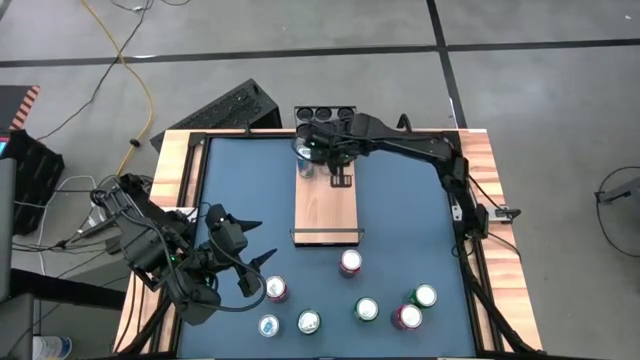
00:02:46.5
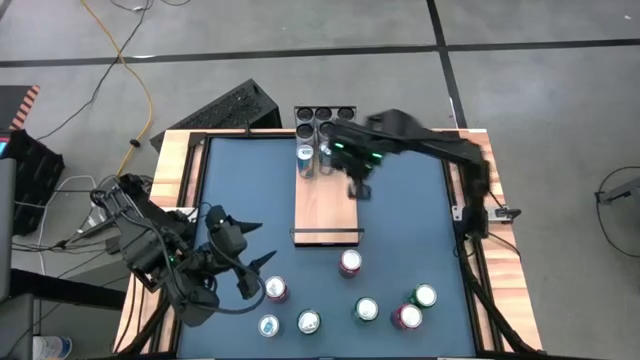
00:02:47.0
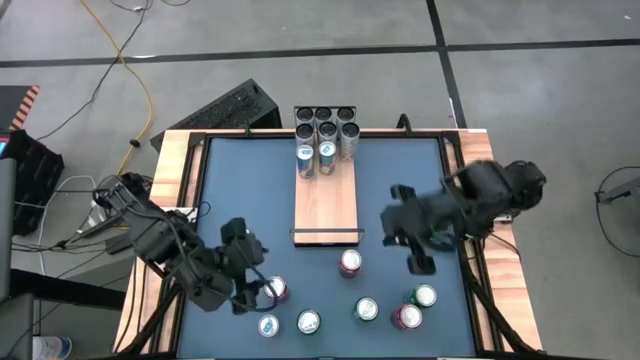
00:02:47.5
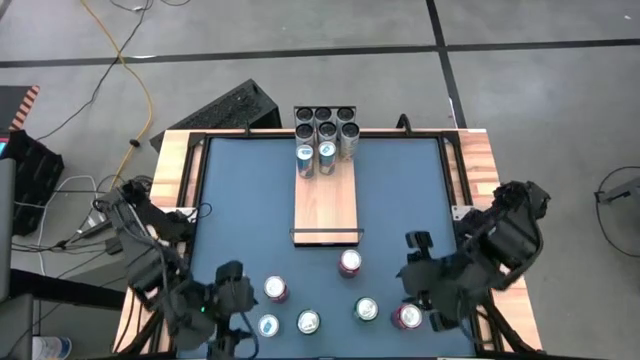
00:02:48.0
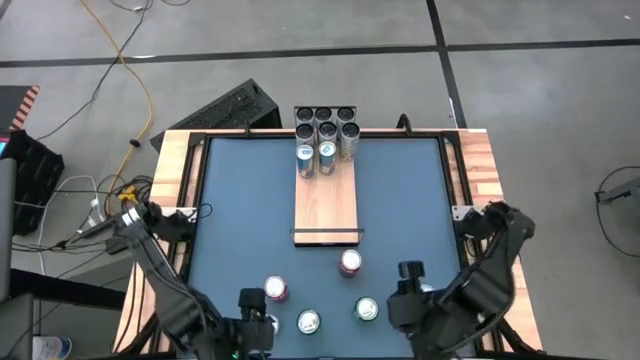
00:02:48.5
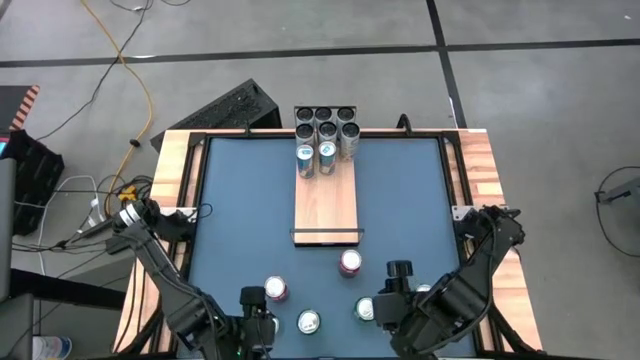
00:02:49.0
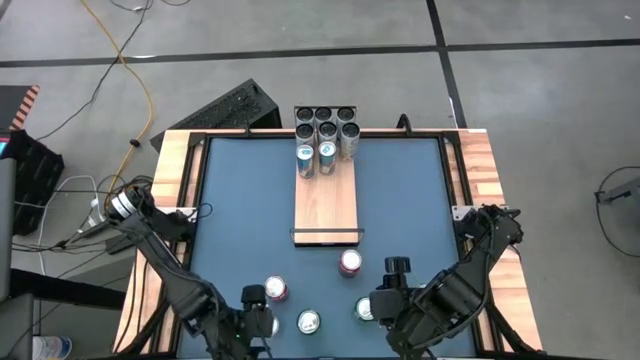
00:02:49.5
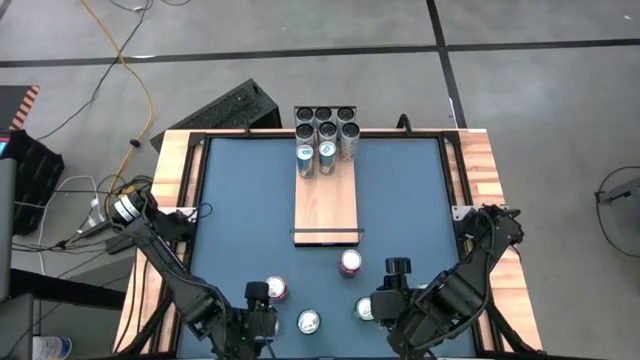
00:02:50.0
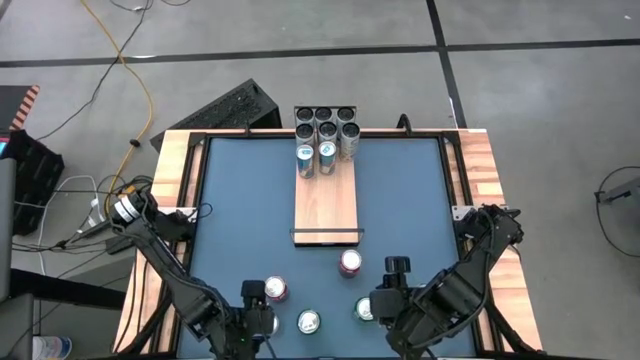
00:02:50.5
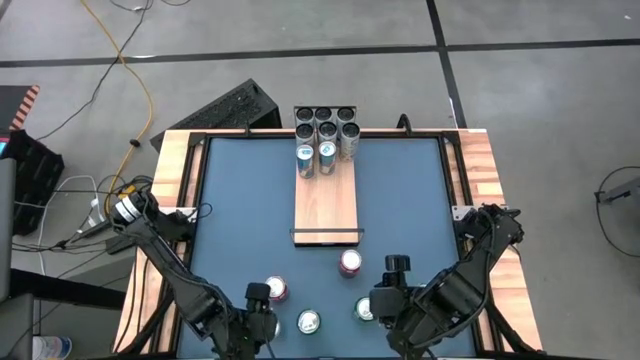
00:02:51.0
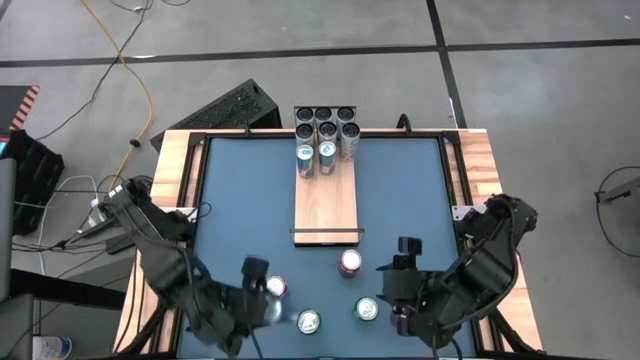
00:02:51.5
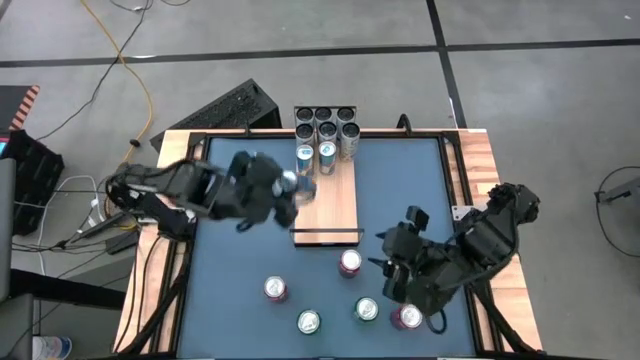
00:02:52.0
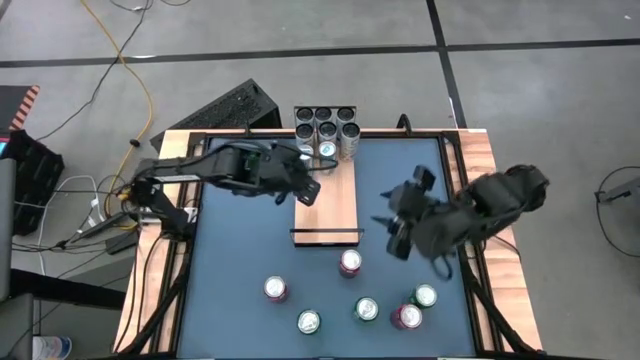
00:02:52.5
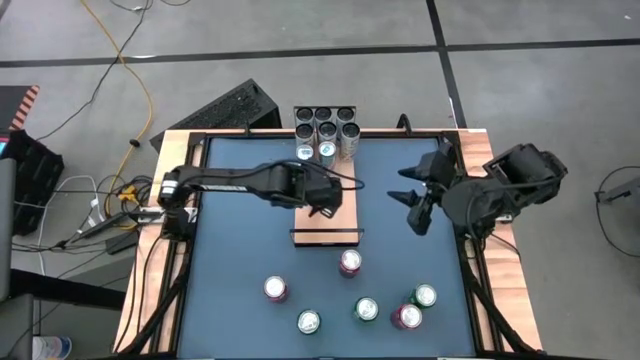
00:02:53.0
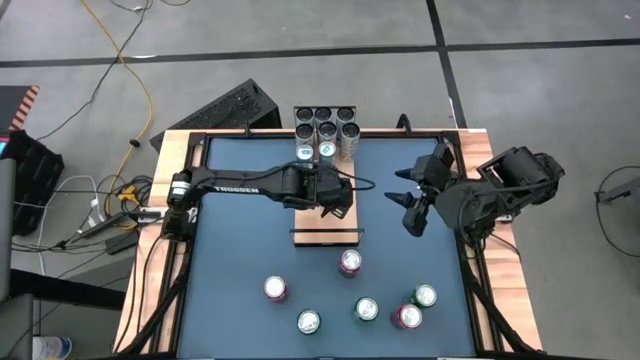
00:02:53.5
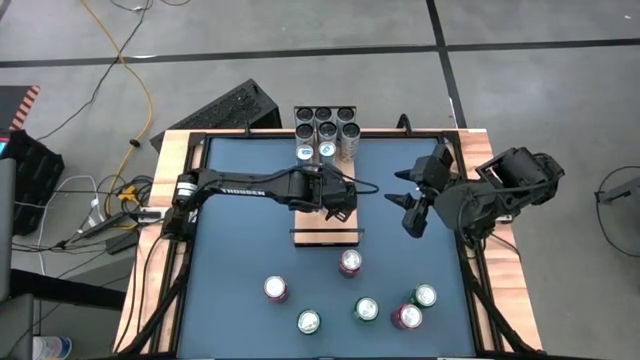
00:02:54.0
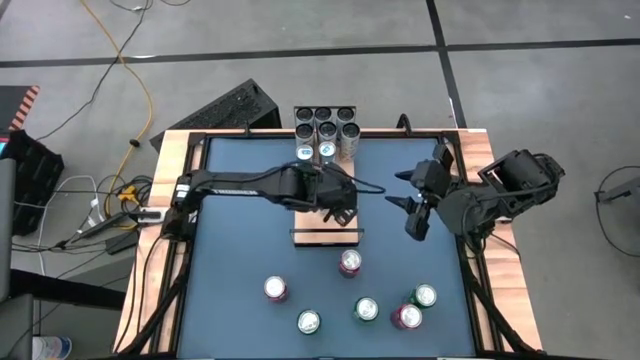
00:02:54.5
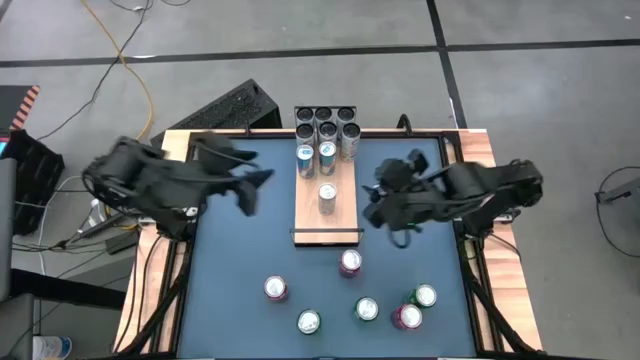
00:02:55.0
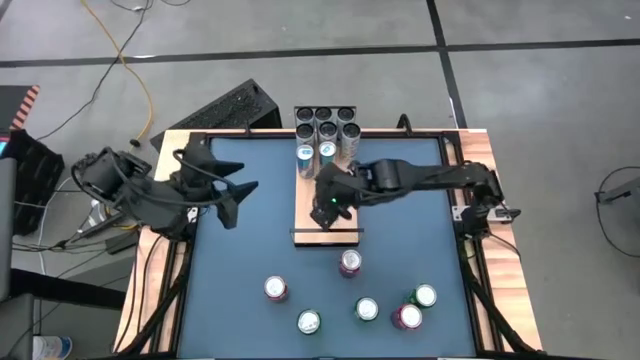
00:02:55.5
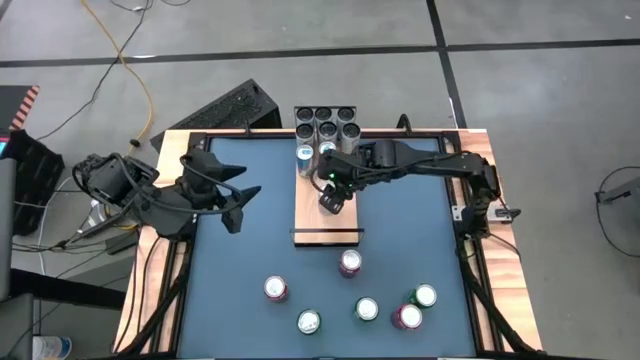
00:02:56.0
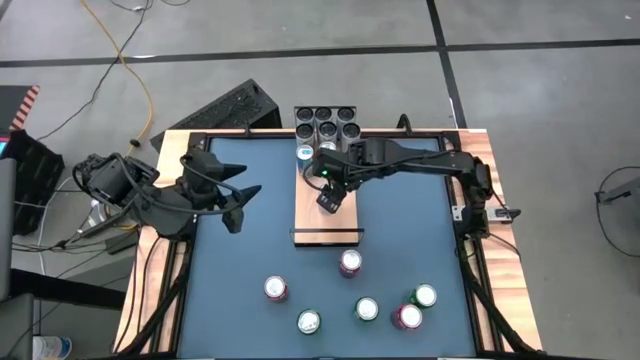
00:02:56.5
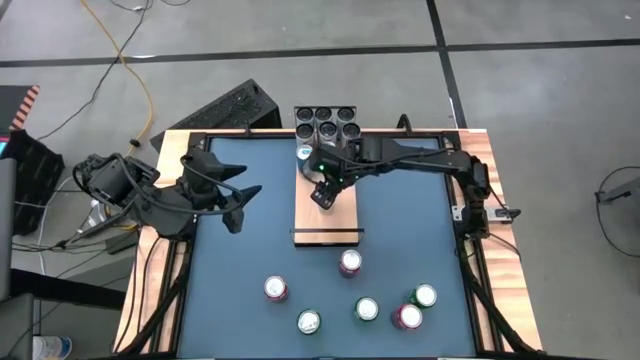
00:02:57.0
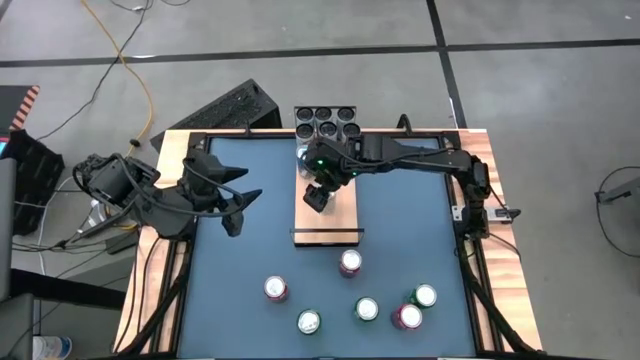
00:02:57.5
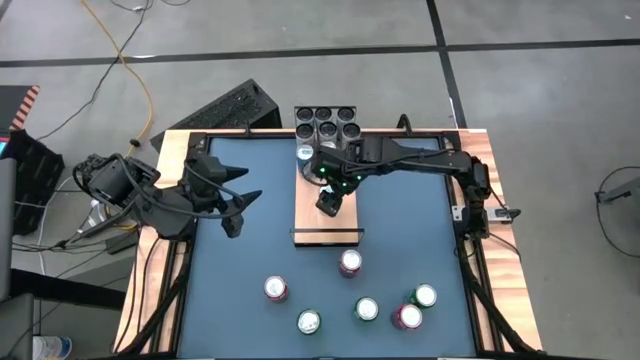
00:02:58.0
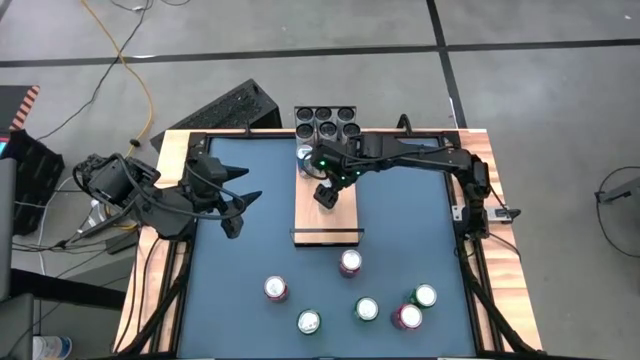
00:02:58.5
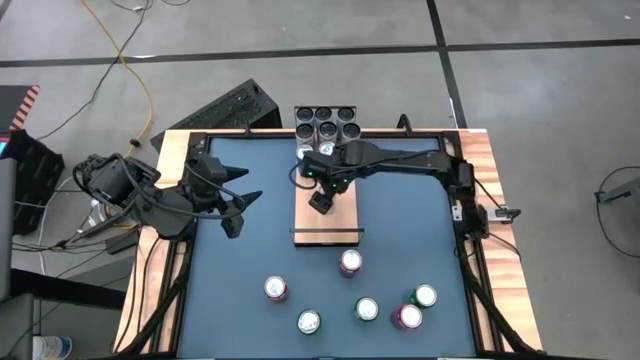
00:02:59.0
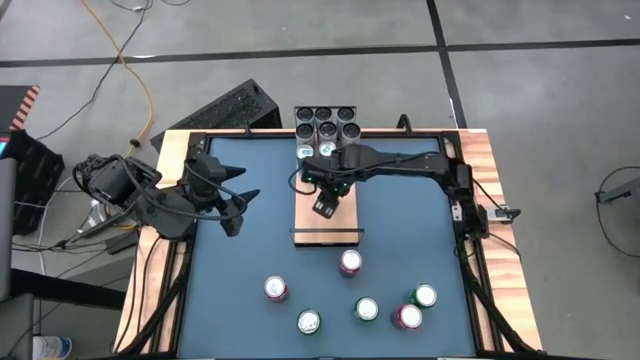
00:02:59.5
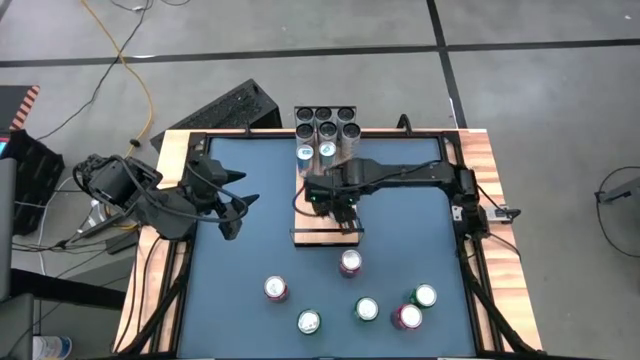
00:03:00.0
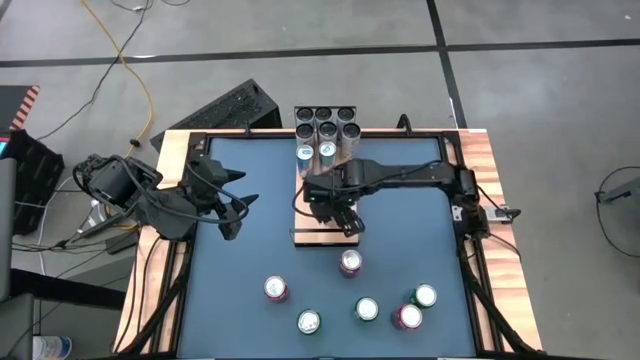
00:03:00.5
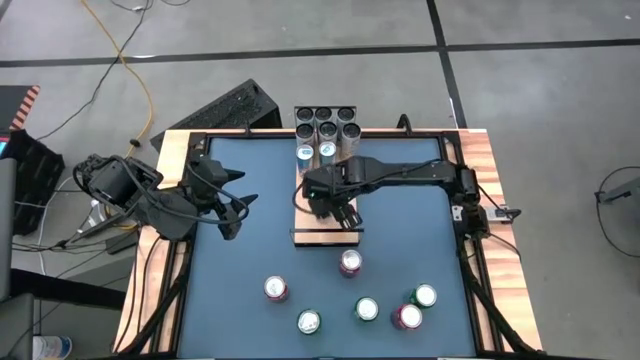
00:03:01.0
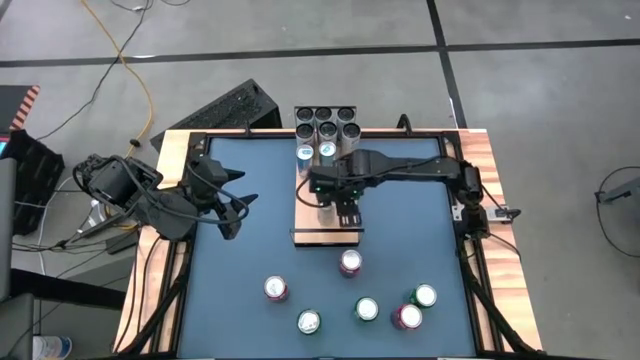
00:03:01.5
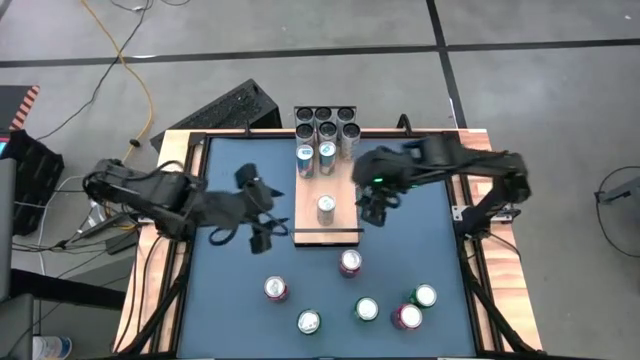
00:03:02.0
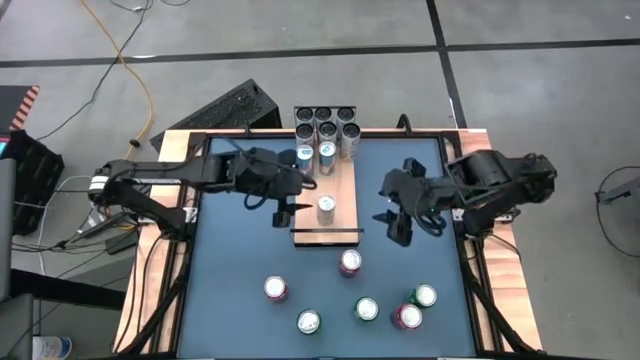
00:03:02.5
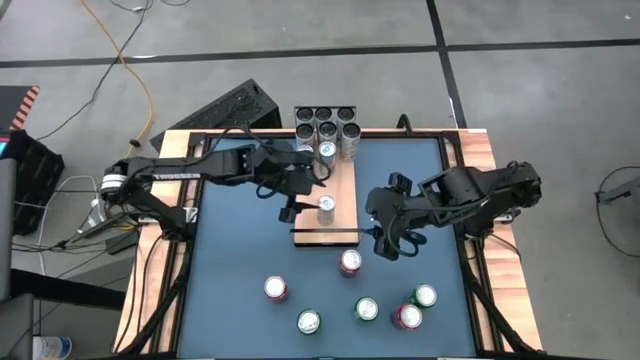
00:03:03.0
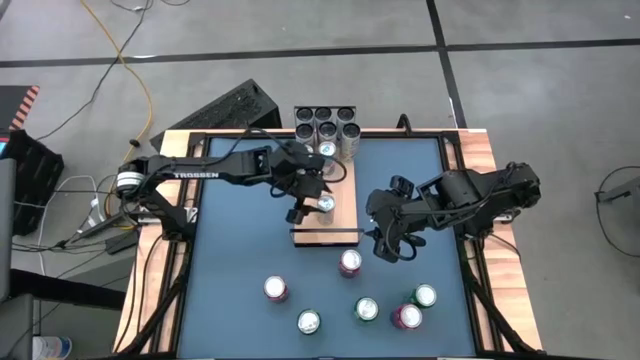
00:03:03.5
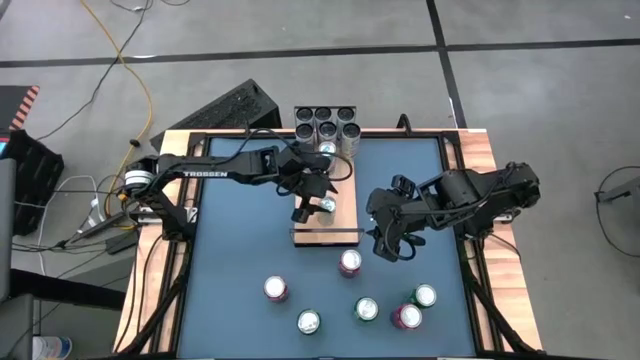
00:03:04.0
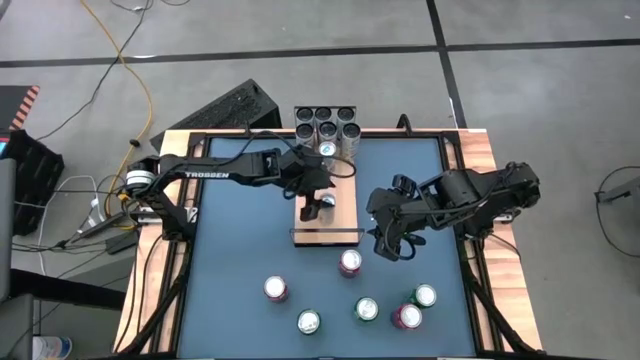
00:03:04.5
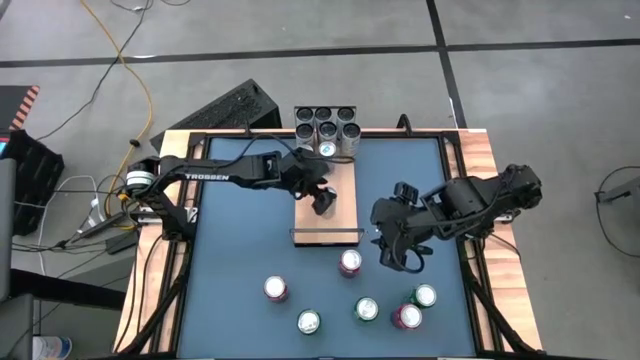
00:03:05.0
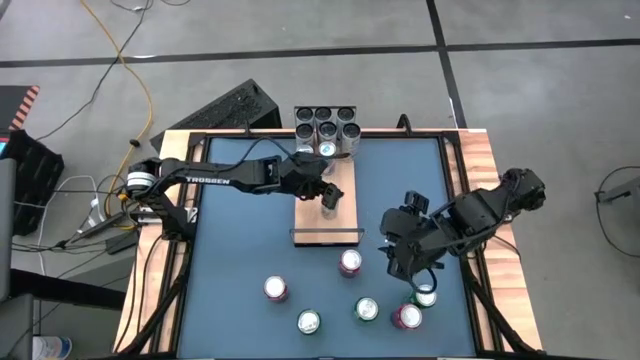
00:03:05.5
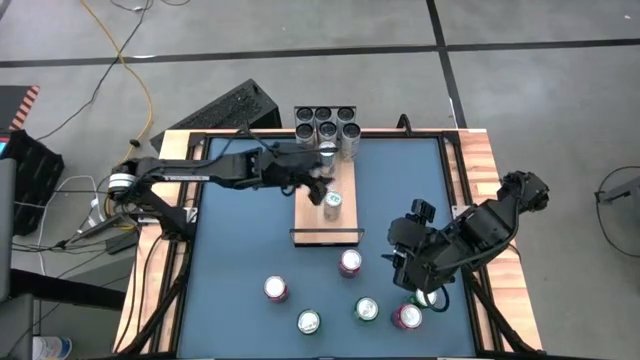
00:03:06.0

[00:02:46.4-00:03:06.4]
Task: Place canned beverage on shelf
Put the blue soda can on the shelf aligned with the other blue soda cans

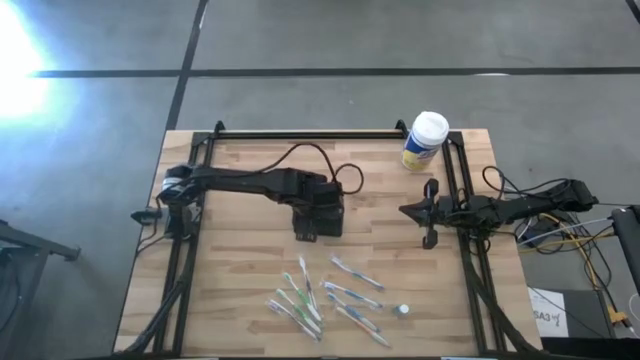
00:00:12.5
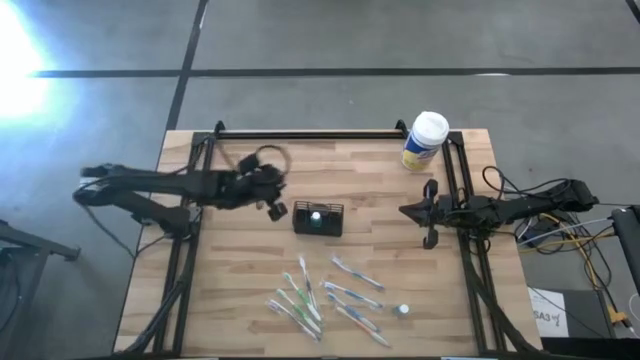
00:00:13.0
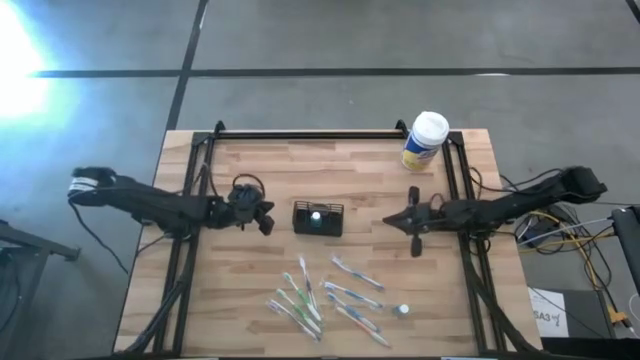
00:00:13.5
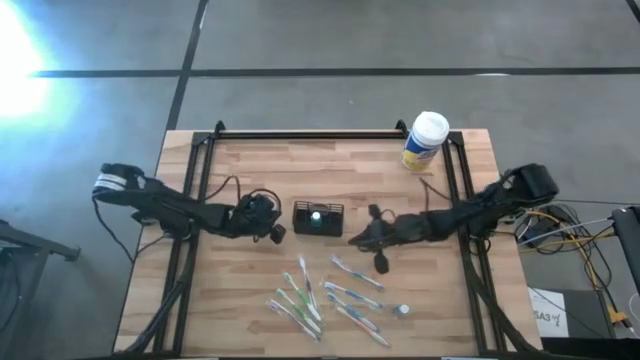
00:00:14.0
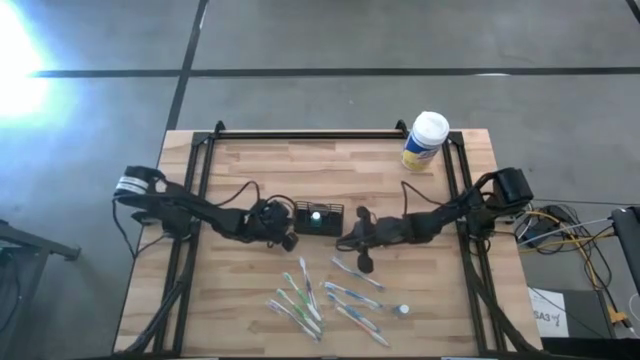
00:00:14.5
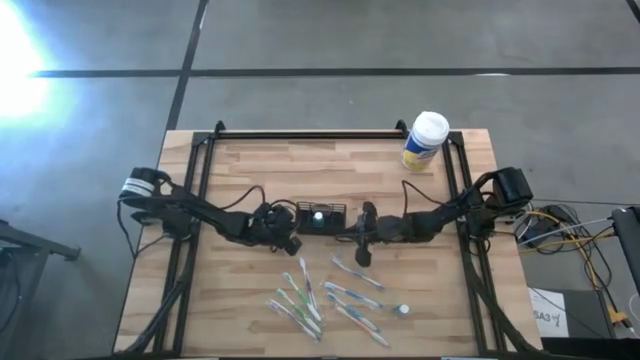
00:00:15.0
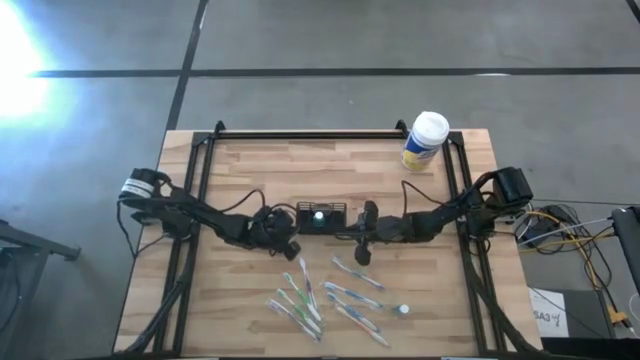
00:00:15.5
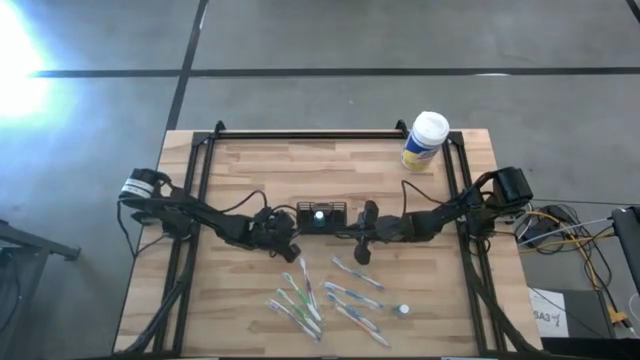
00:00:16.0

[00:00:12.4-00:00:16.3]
Task: Pick & Place toothbrushing station
Adjust the black mesh organizer
